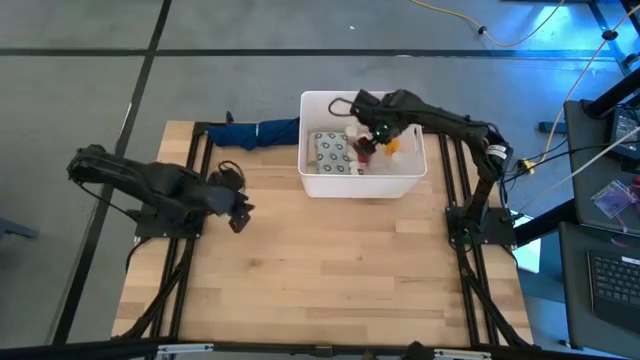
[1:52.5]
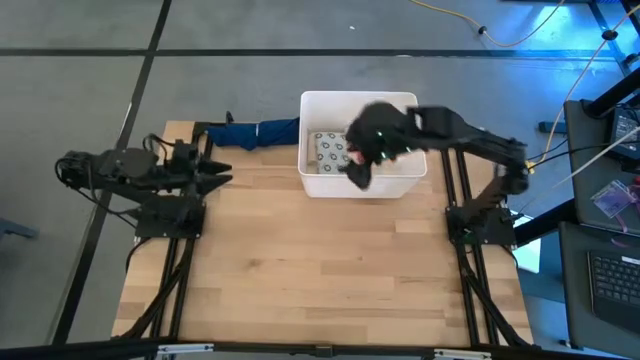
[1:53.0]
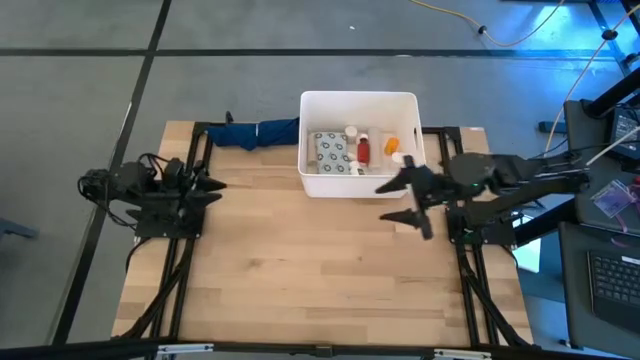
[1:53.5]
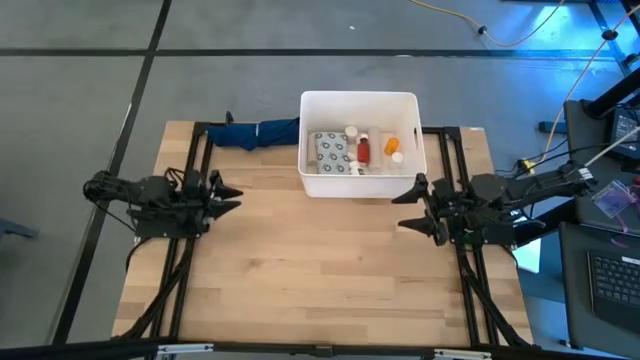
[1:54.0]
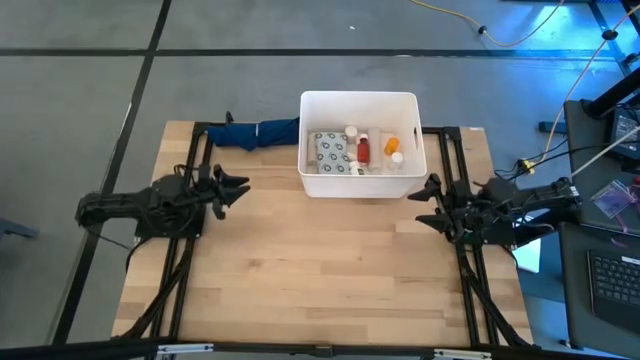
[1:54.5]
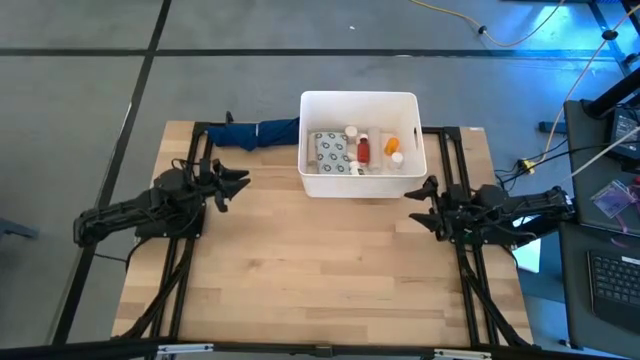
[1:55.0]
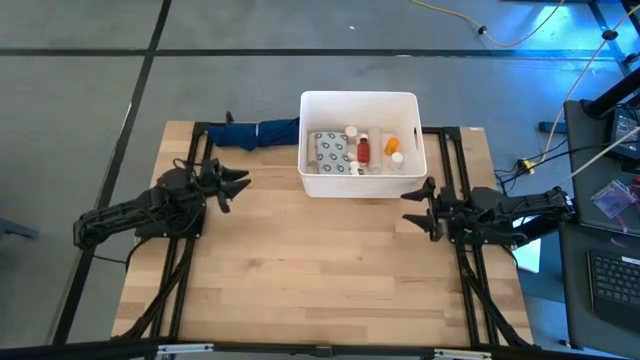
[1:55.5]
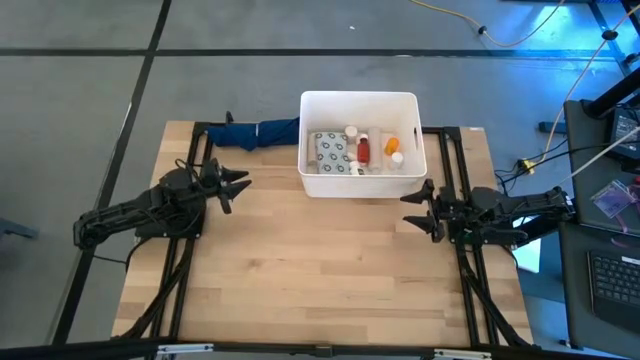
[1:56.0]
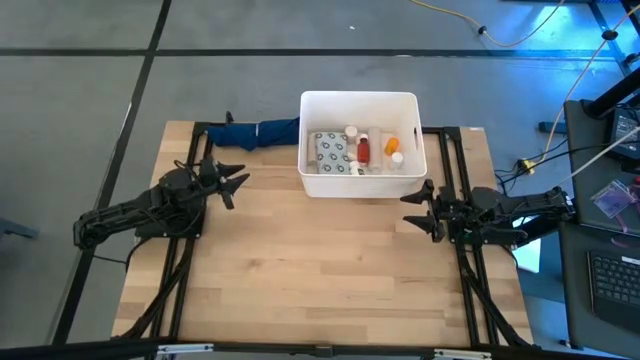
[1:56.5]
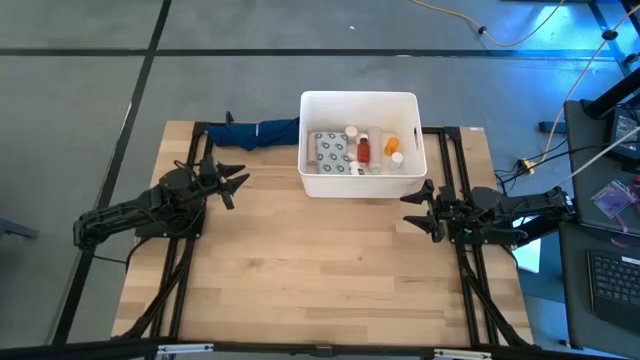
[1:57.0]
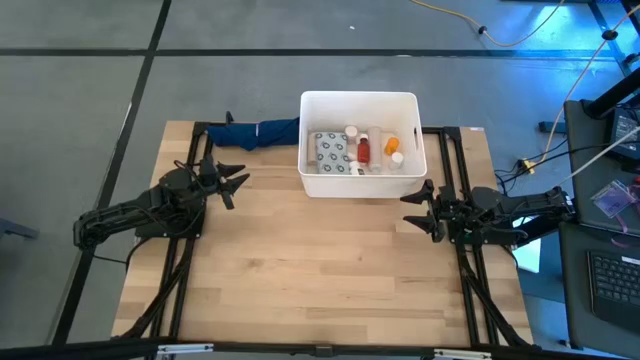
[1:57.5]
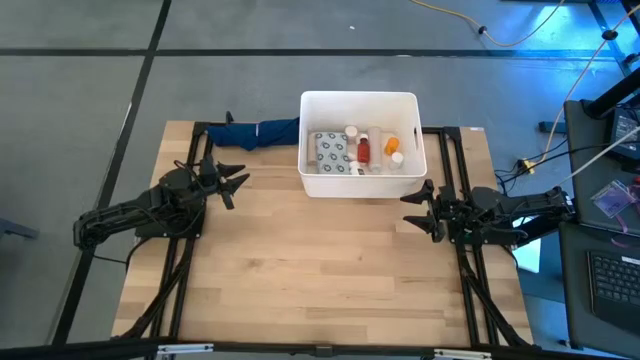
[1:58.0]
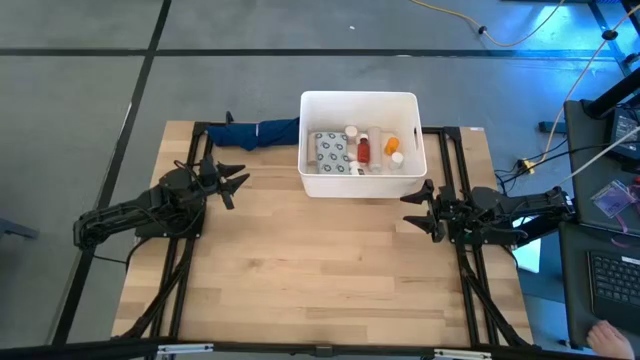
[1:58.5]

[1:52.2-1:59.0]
Task: Pick & place medical supplies in basket/bin
Return to Home Position

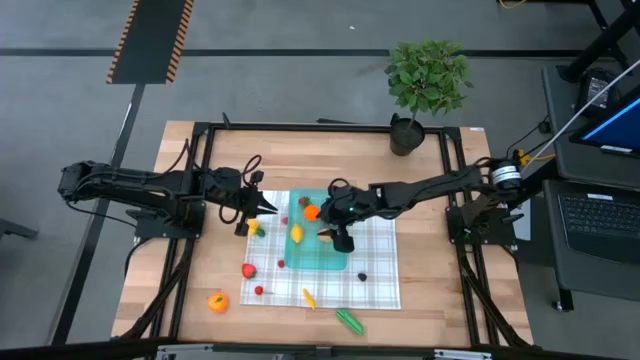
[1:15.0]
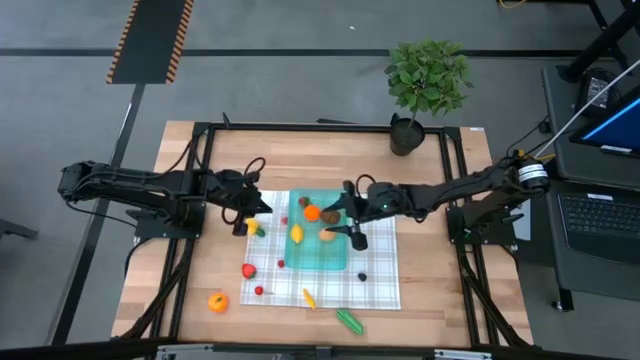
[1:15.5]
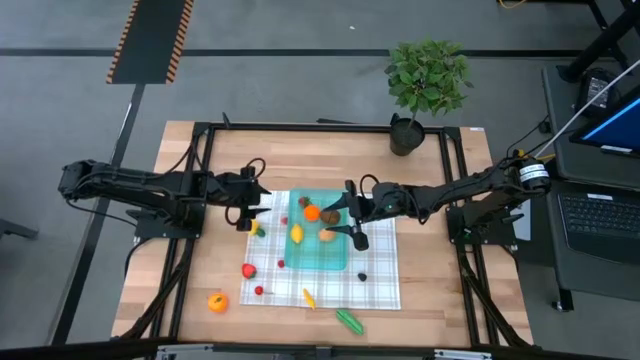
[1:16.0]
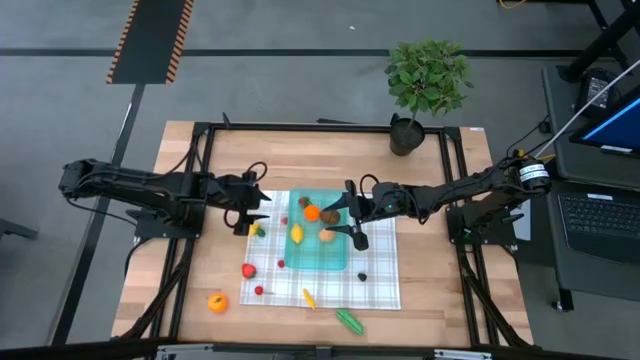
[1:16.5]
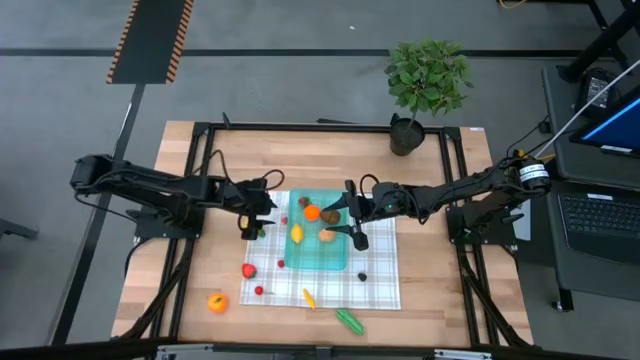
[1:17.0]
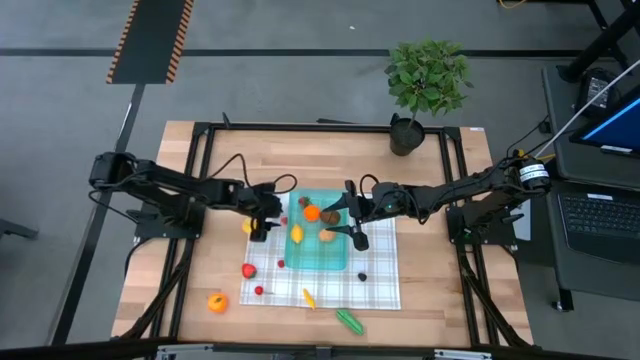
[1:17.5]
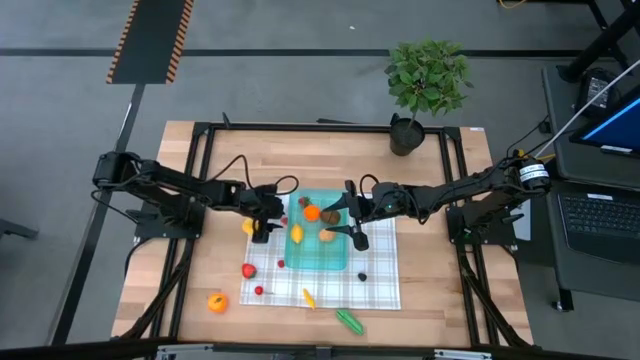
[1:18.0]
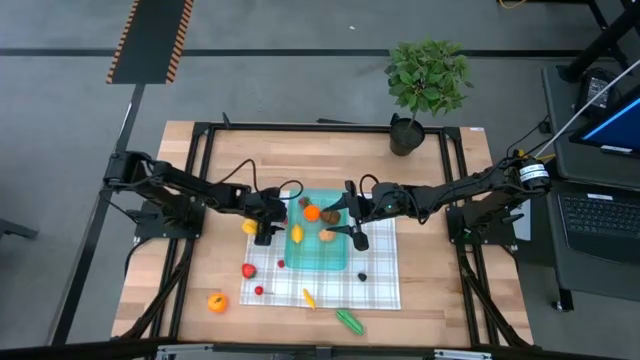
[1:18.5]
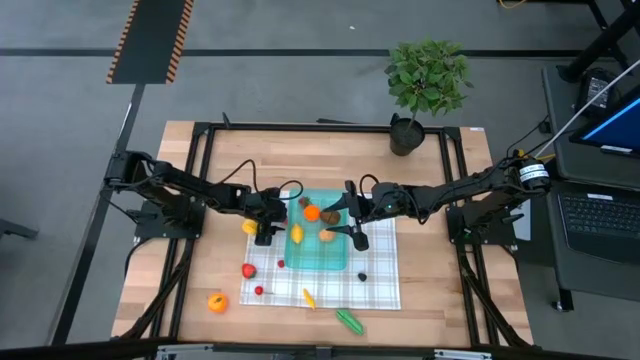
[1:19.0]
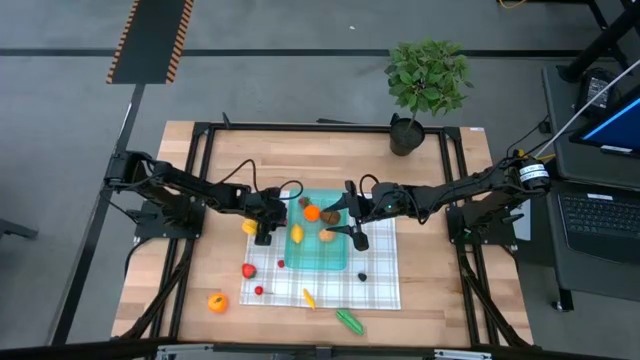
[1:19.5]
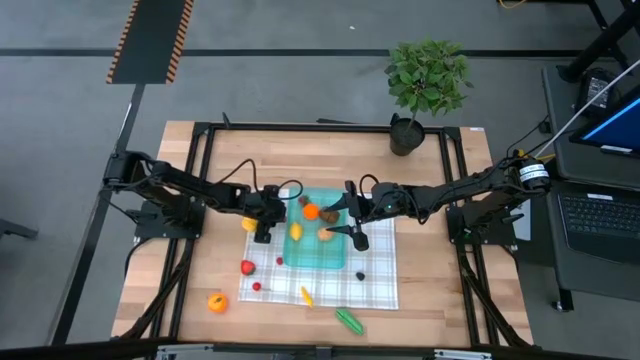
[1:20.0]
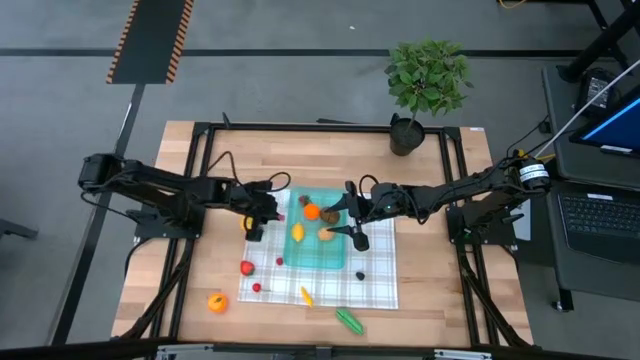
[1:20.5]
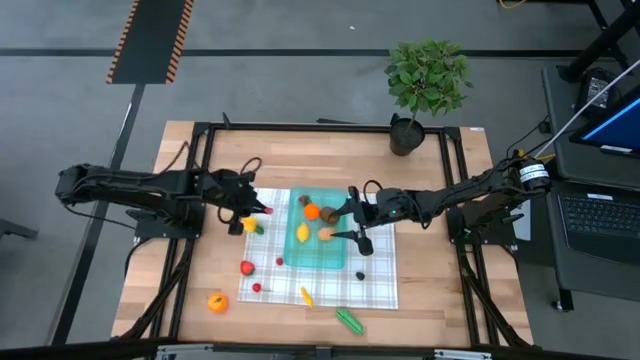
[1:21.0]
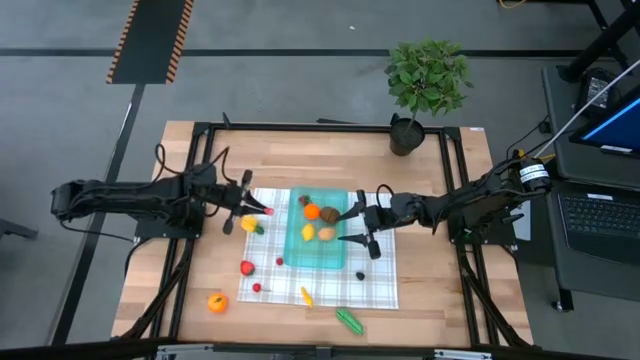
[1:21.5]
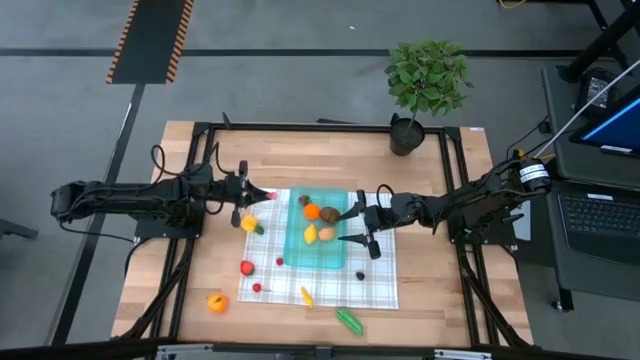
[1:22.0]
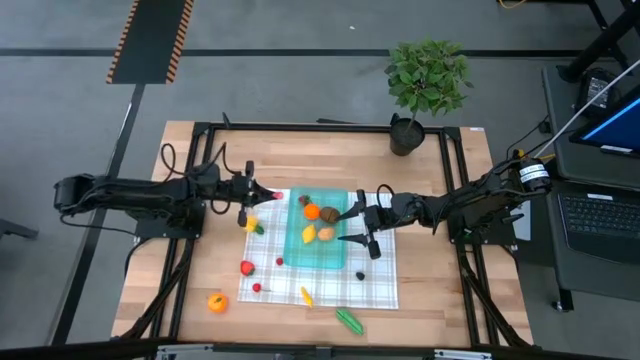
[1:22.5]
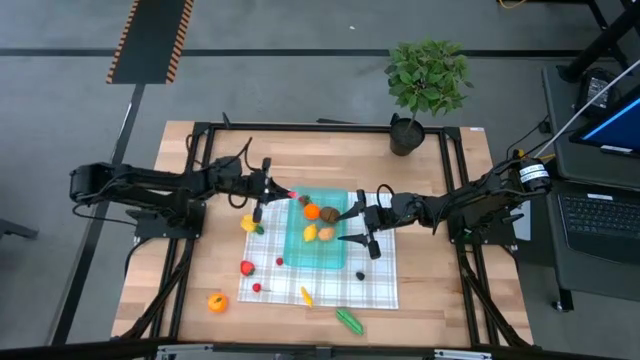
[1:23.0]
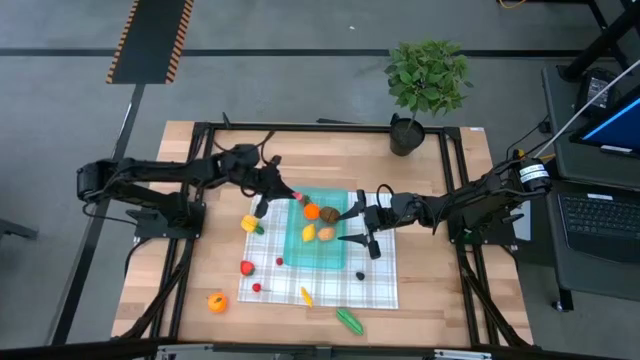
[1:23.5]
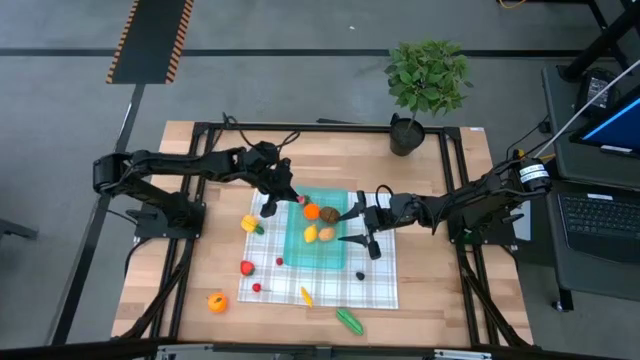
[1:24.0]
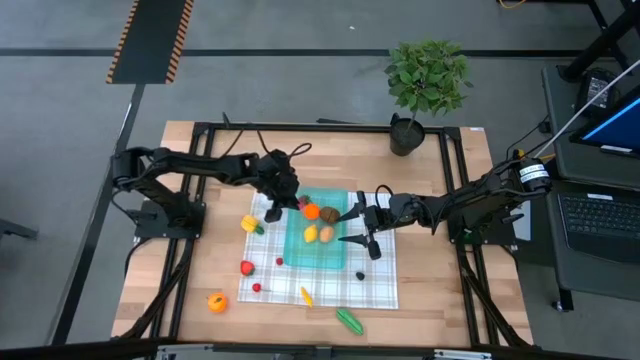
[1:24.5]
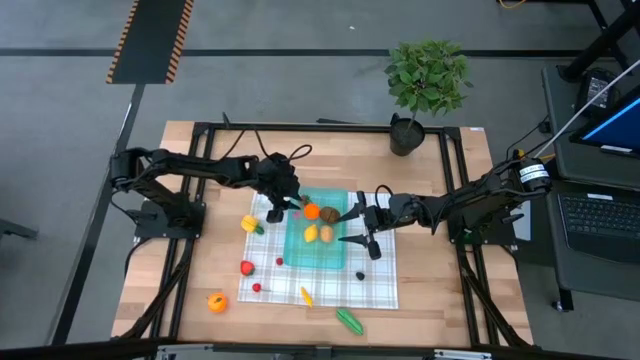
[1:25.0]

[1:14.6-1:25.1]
Task: Pick and placing Produce into tupperware
Put the pink peach into the blue bin
